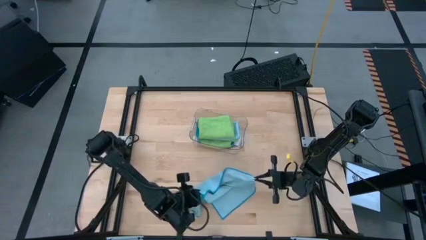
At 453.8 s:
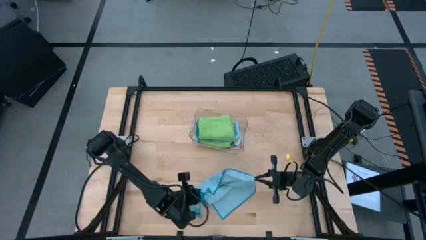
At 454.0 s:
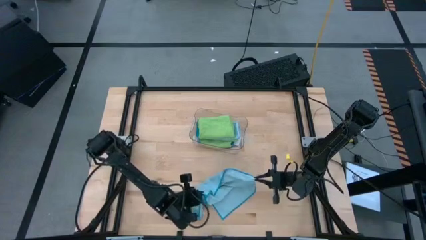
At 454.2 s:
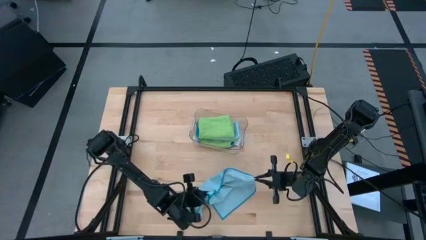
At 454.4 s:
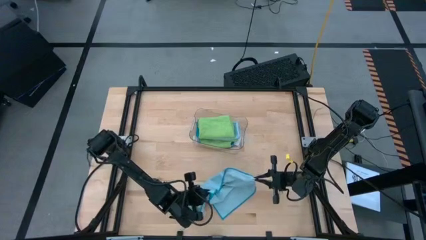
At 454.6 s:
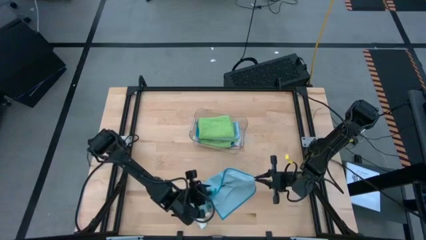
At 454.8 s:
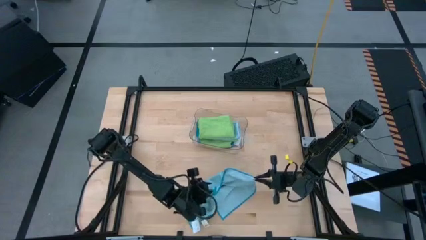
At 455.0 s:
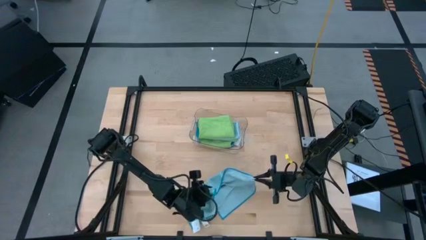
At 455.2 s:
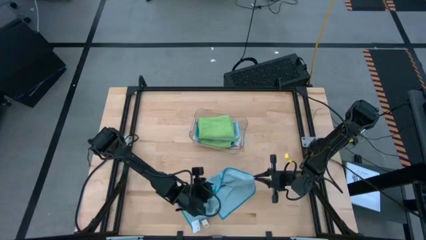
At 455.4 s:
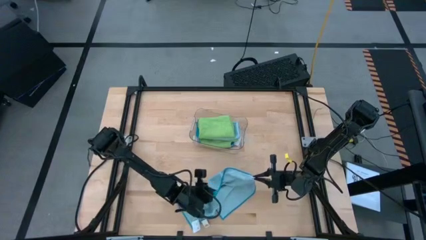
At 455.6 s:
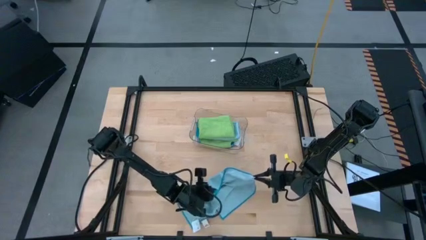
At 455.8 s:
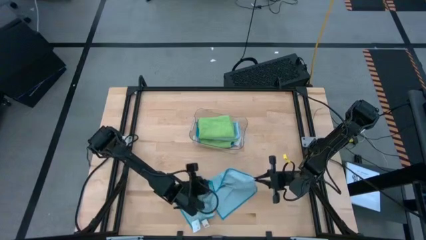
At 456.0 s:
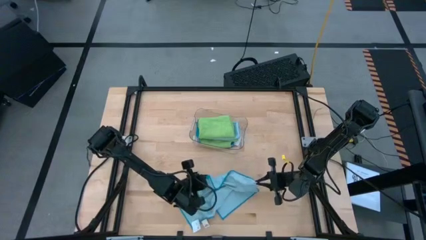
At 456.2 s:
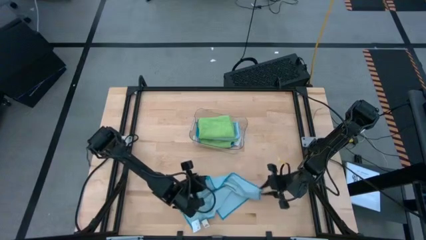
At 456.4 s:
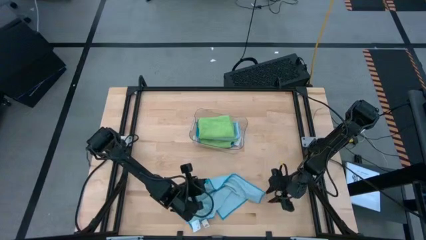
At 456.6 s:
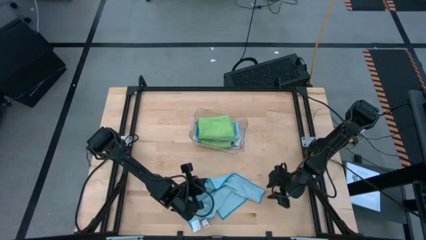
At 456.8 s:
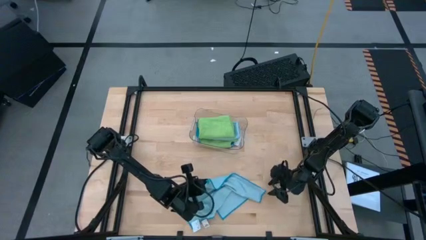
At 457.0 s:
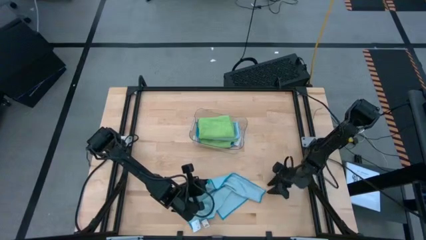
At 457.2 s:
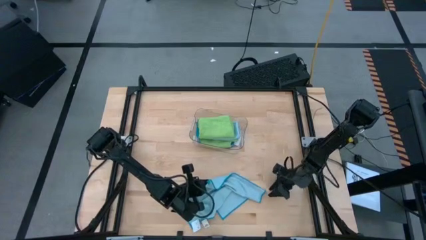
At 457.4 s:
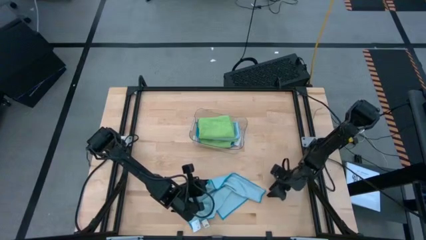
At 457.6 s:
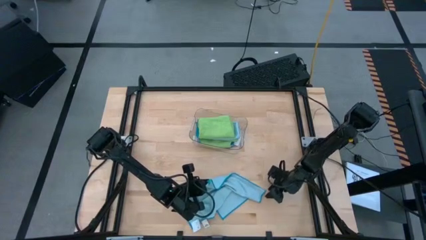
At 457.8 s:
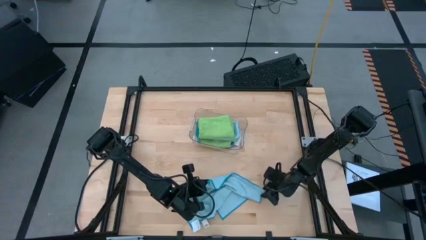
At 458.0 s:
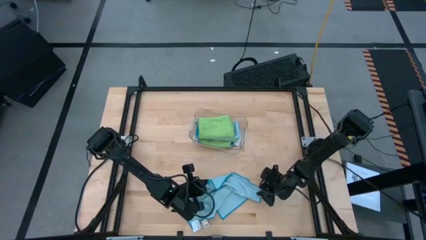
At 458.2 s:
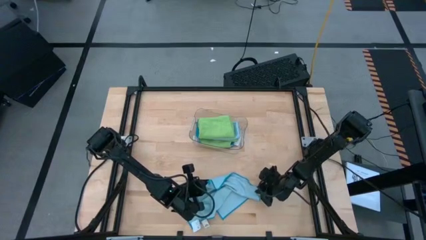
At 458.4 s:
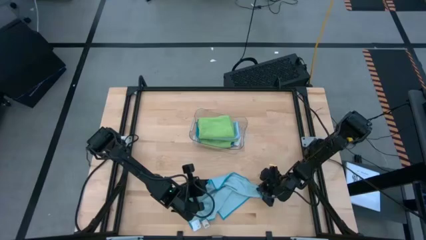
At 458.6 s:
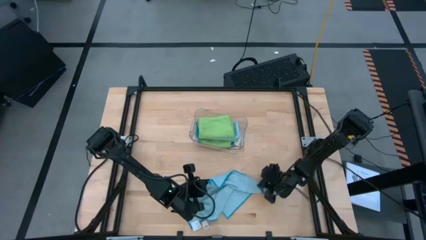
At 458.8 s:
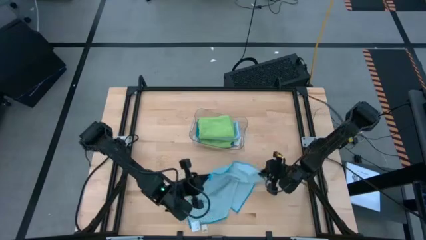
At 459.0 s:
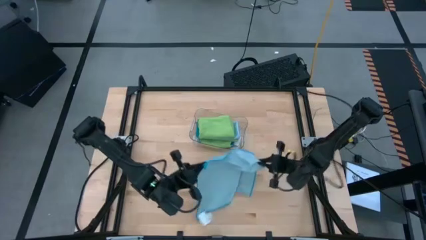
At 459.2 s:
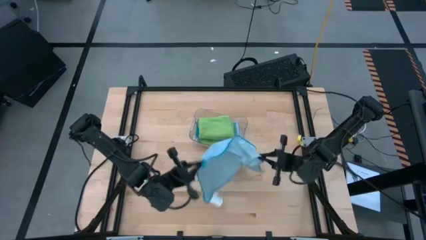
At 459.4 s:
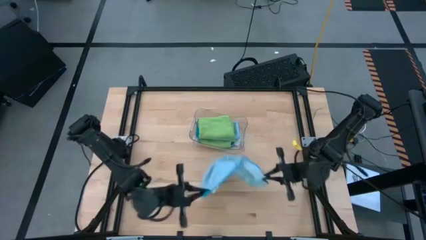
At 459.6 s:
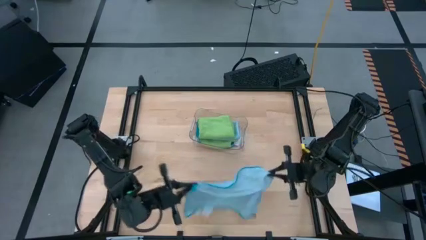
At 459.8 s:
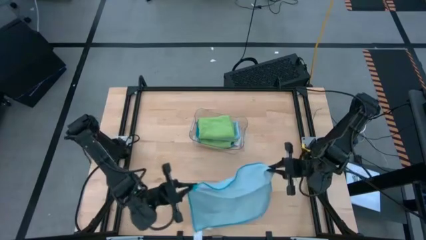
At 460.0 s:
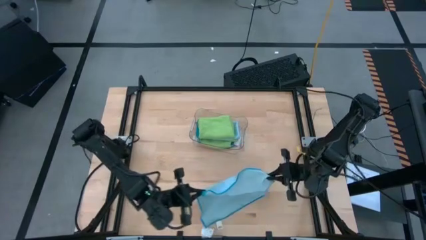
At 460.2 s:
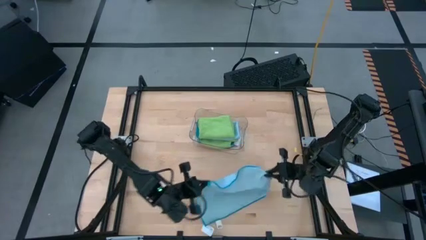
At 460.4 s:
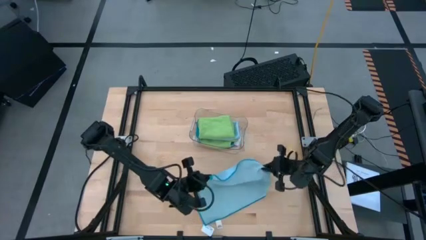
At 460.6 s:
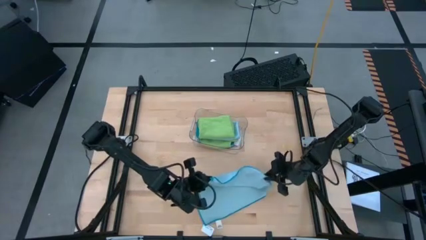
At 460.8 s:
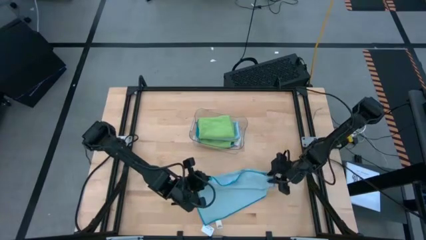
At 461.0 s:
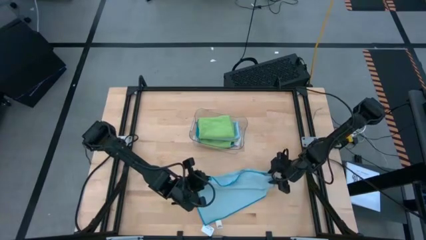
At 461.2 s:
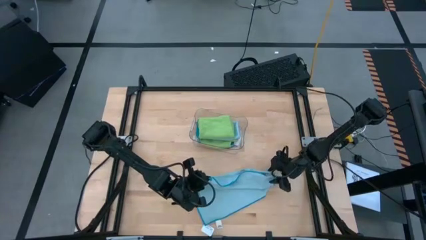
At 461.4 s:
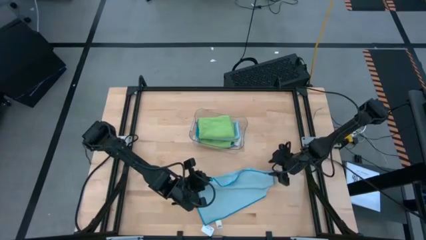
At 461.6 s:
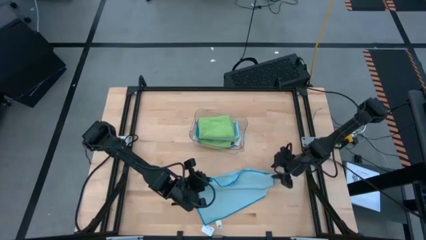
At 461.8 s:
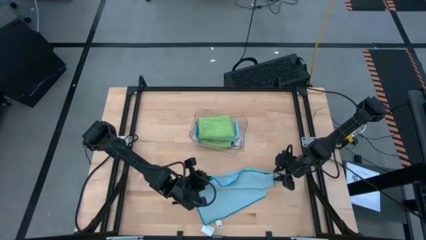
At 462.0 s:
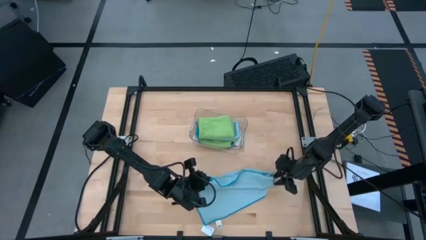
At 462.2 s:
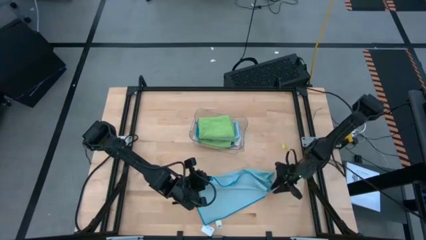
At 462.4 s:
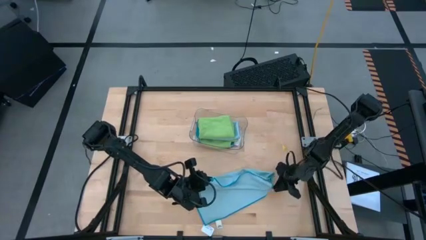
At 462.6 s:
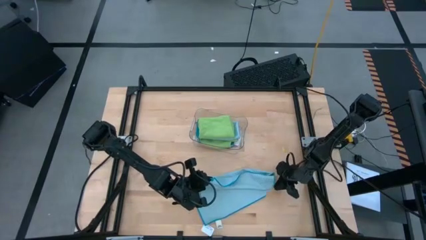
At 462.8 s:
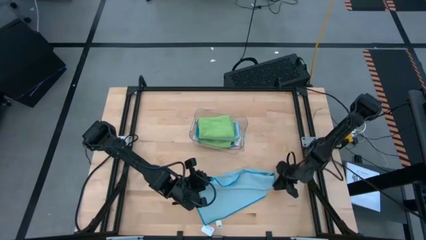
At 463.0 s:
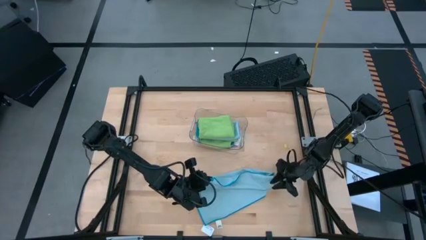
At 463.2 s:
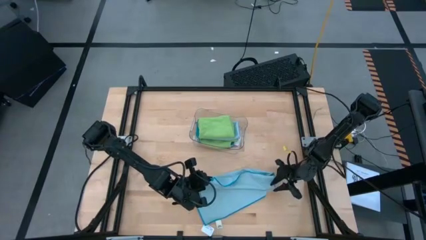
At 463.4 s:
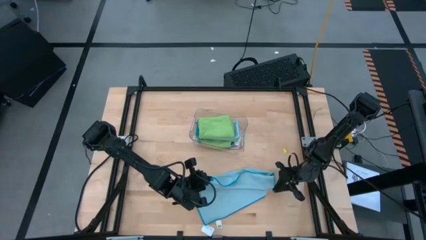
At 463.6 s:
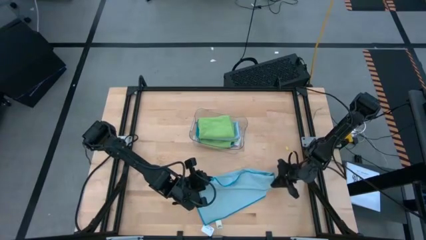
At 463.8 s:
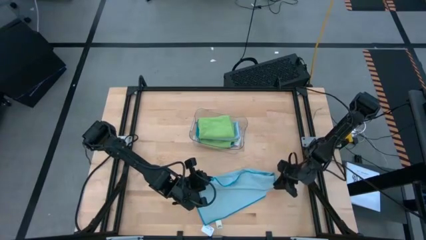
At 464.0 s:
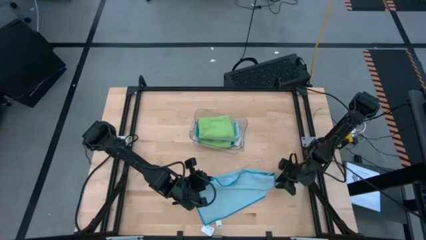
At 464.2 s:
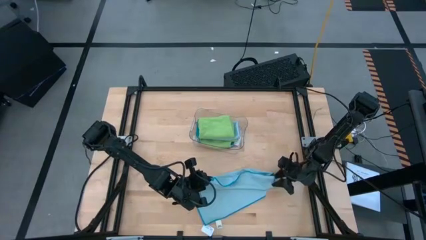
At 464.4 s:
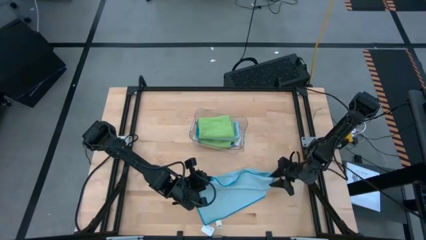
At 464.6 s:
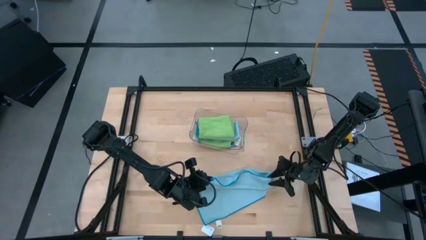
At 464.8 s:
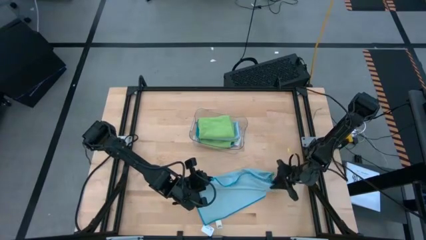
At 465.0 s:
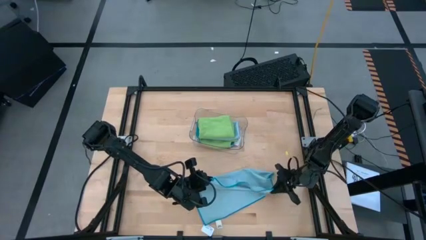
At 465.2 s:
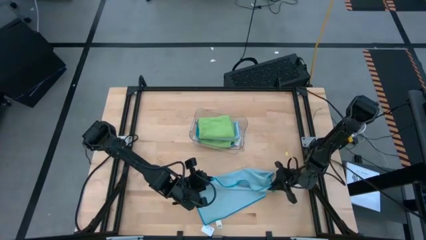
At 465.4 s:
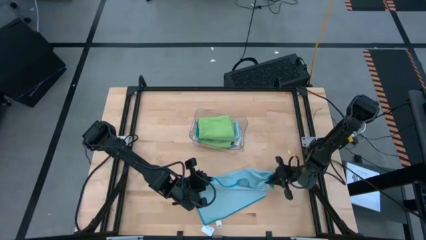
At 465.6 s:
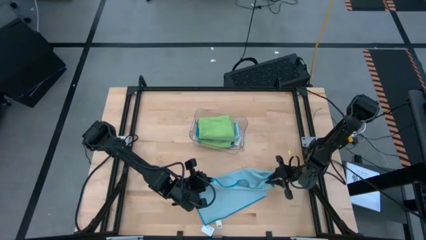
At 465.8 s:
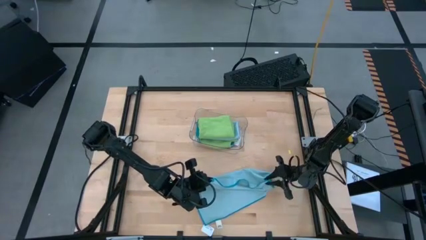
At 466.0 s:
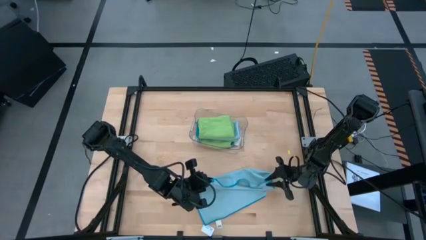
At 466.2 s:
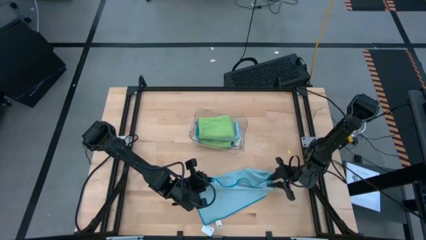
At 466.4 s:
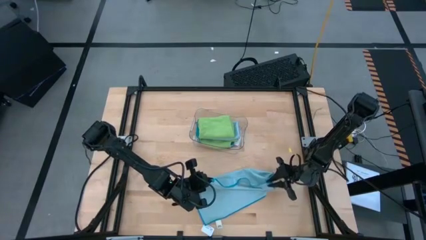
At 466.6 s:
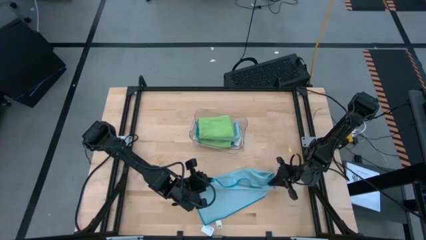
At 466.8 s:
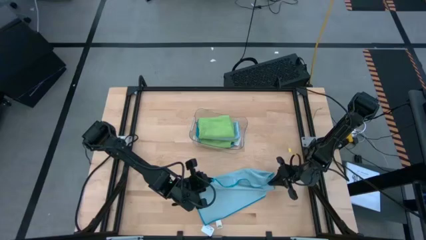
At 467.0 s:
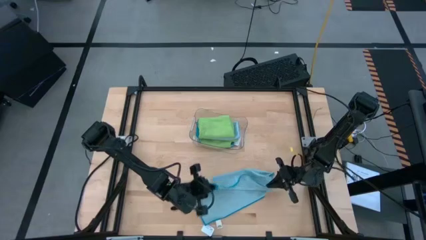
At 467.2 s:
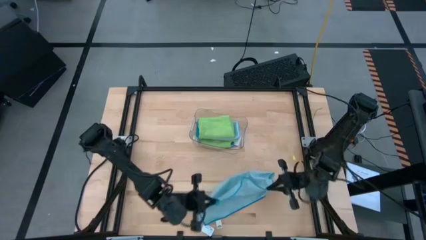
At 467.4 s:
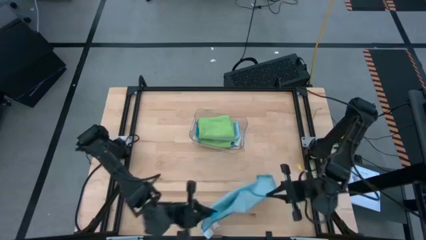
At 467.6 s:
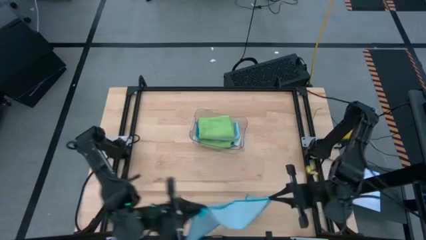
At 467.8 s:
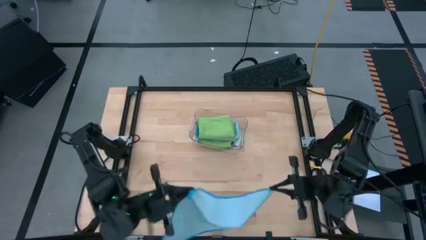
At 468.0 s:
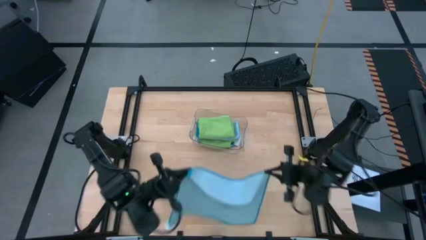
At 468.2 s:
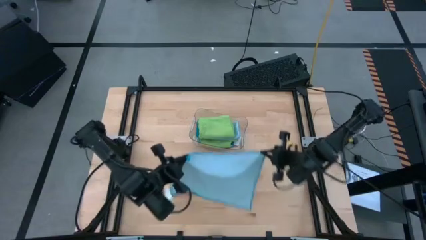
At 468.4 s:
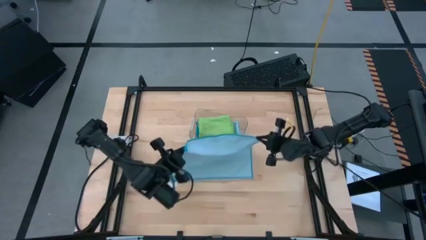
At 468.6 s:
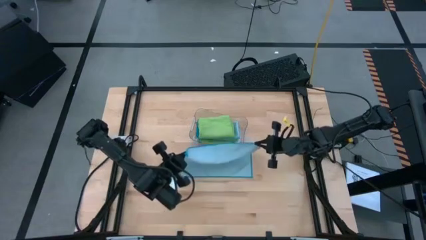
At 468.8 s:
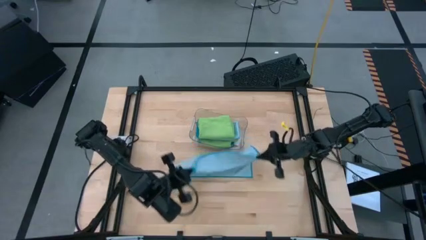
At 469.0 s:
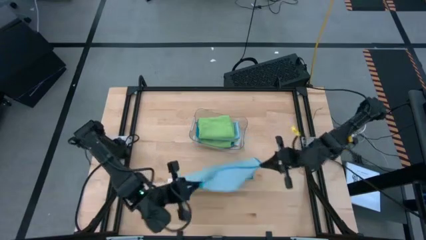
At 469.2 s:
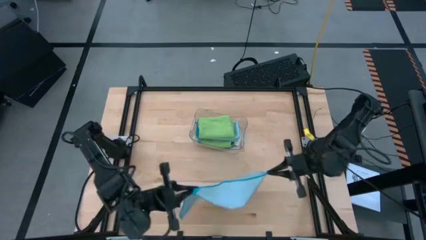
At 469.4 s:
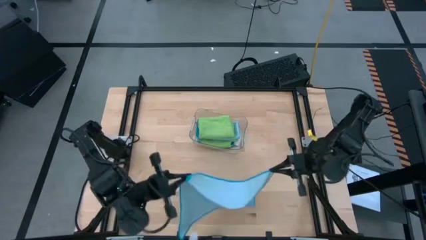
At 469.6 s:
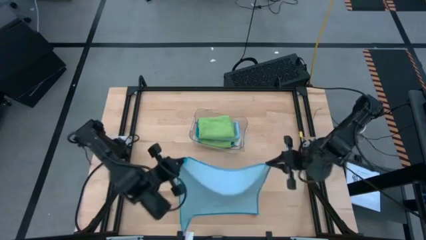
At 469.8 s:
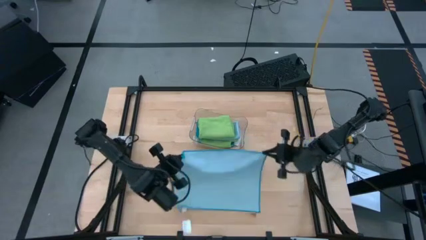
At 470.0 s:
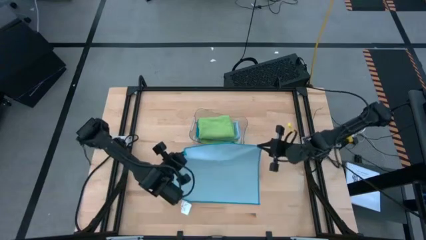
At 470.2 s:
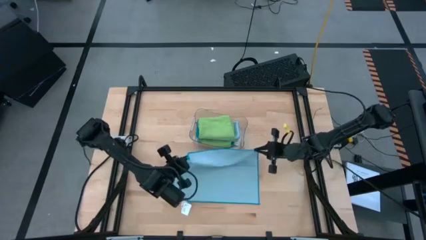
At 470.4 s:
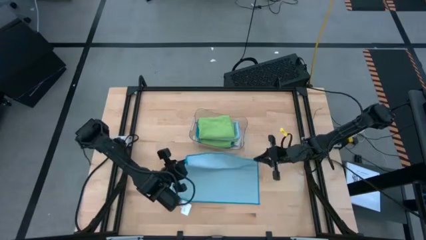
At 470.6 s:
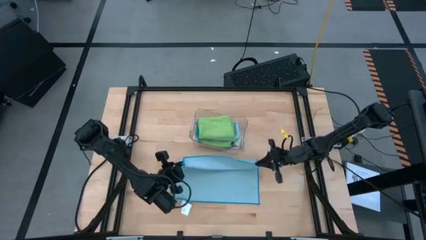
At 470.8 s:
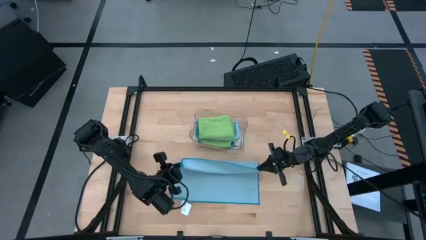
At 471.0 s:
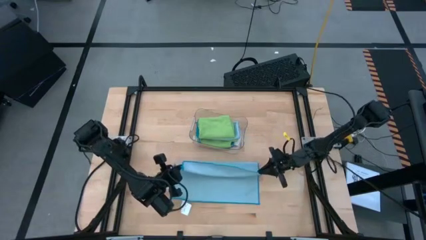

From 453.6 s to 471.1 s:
Task: Fold microfiber towels
Fold the blue microfiber cloth
